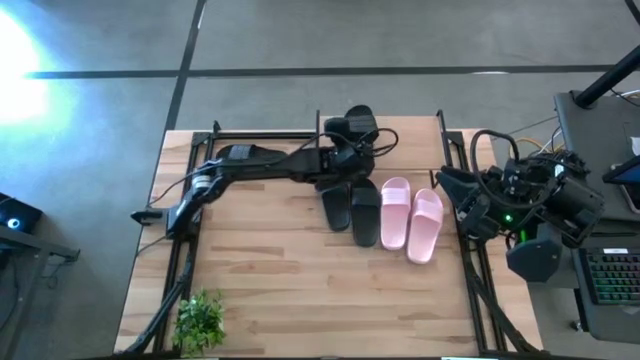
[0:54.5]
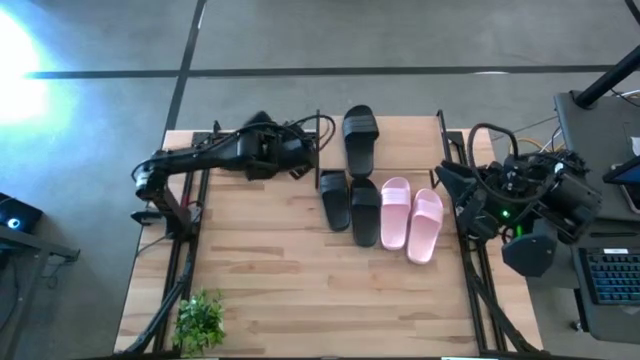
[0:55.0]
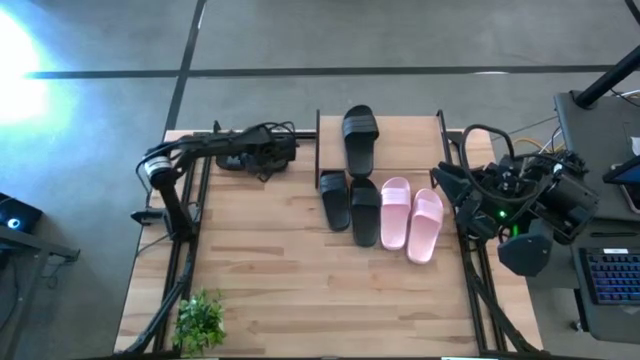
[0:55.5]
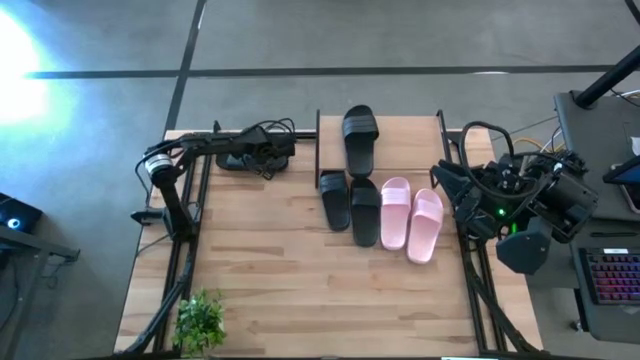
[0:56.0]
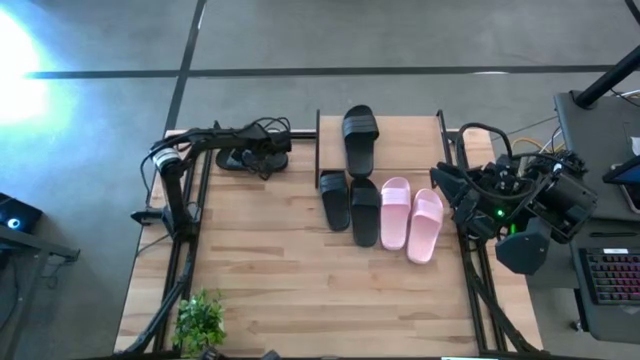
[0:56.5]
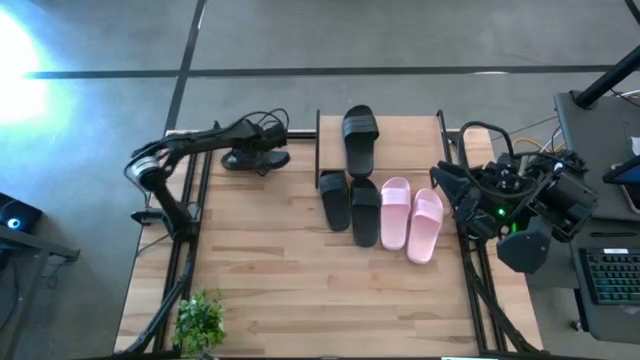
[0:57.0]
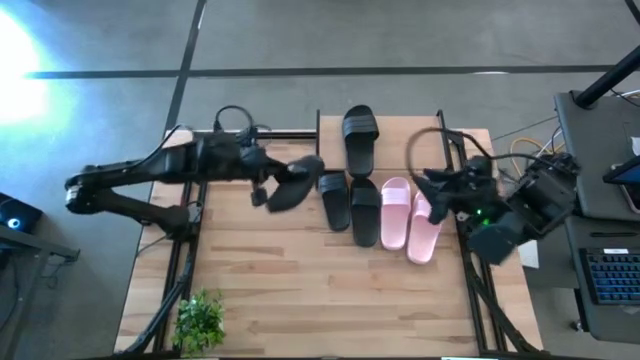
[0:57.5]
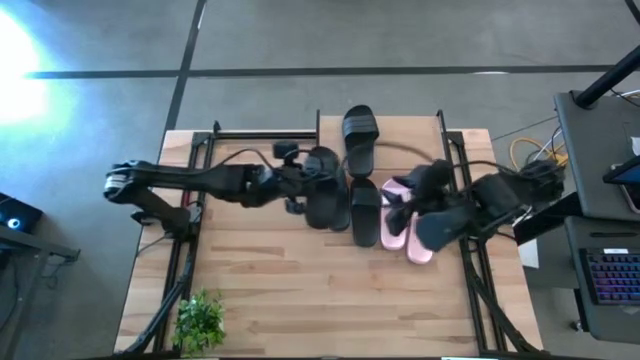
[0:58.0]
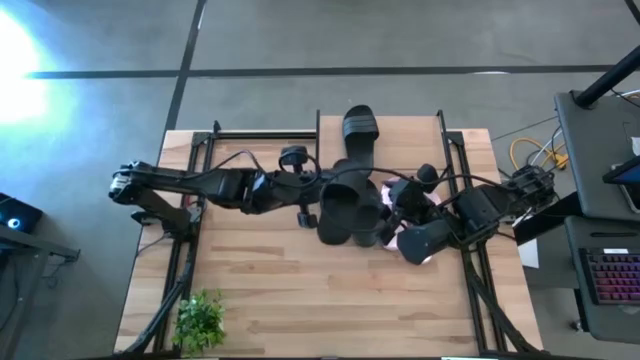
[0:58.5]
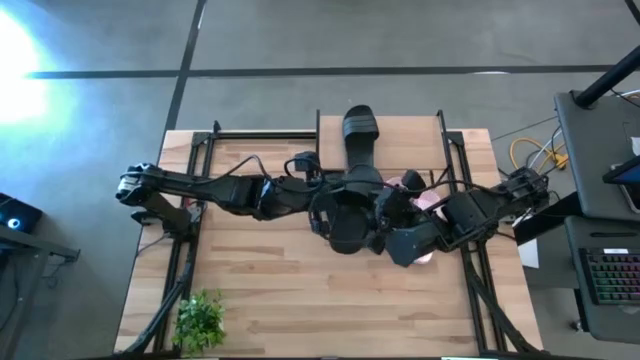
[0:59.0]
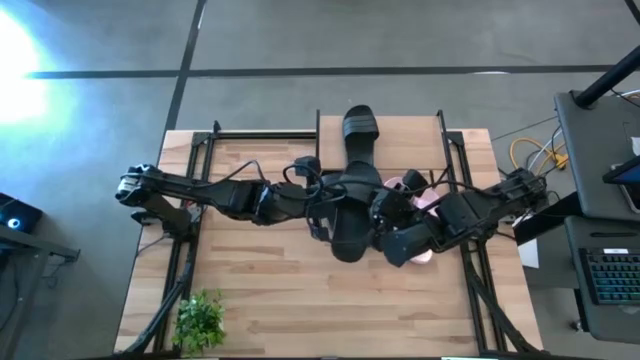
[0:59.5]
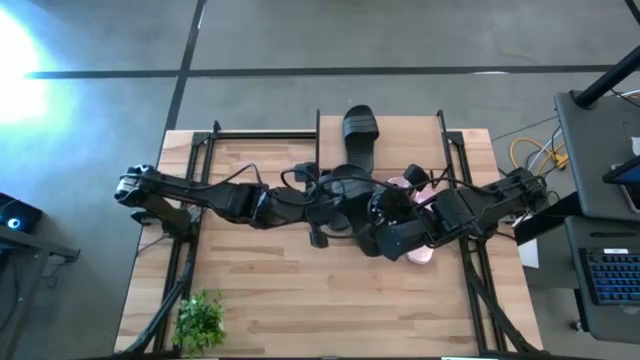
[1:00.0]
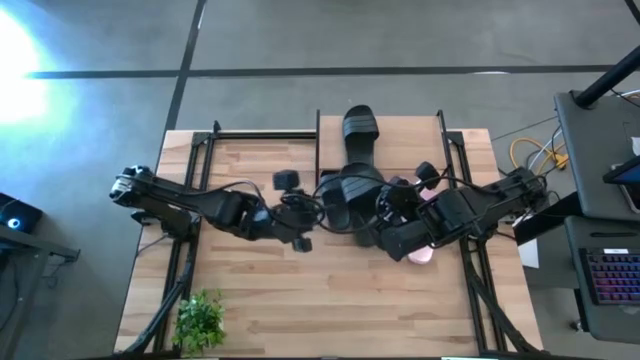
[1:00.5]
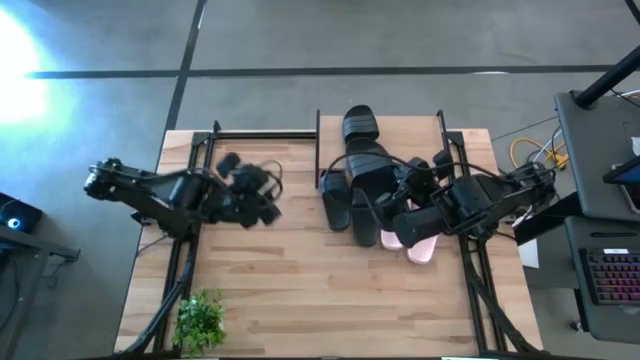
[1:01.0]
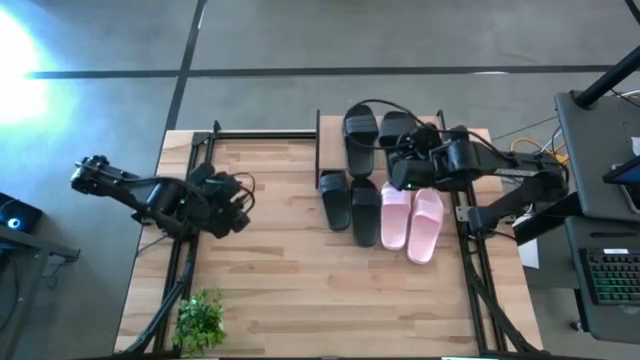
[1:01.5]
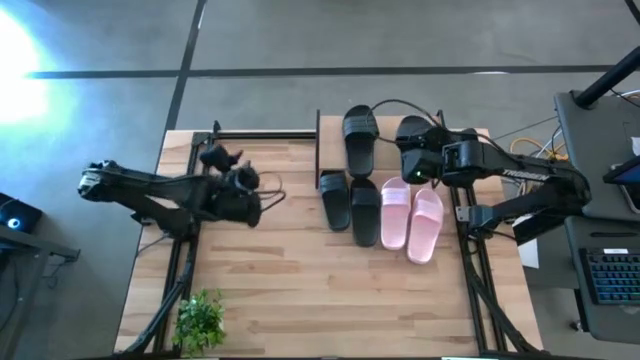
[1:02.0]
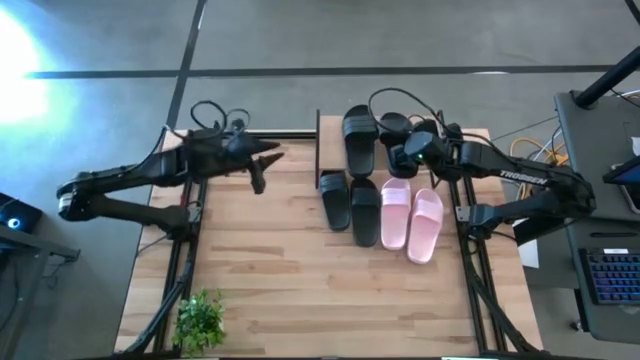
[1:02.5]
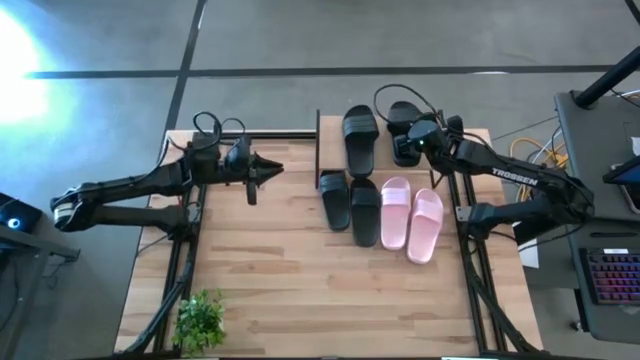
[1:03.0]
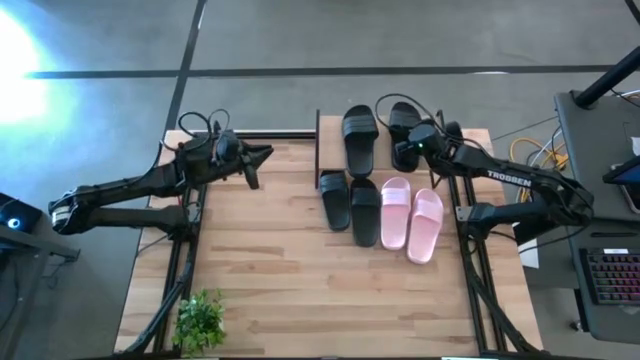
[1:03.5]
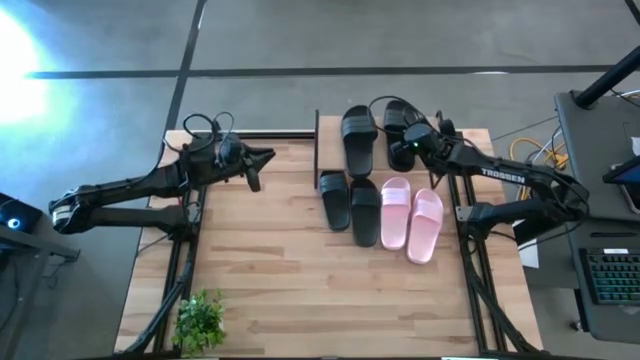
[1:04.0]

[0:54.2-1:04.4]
Task: Pick and place slides into the shelf
Put the black slide on the shelf

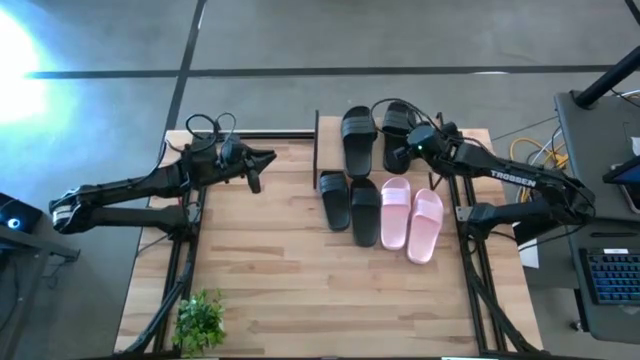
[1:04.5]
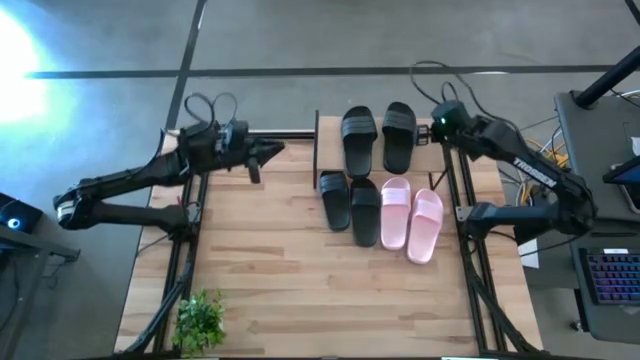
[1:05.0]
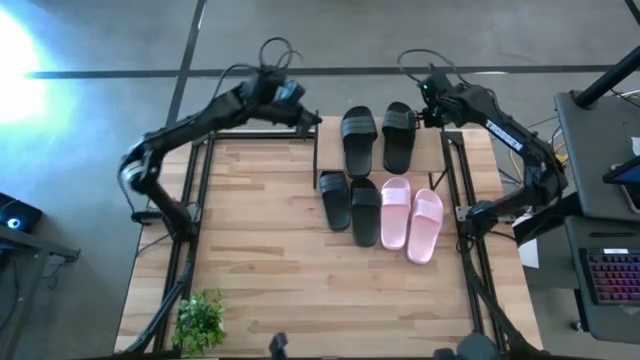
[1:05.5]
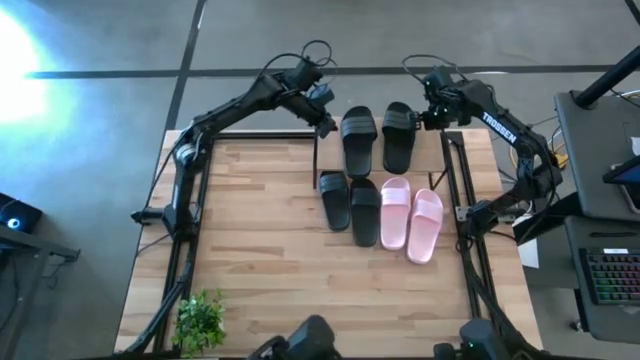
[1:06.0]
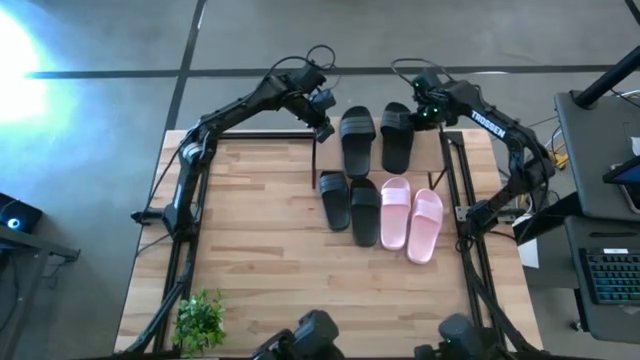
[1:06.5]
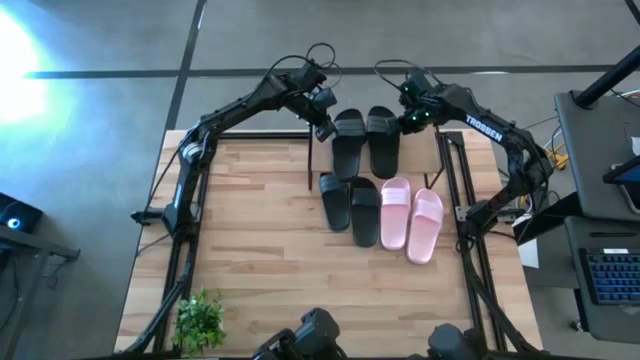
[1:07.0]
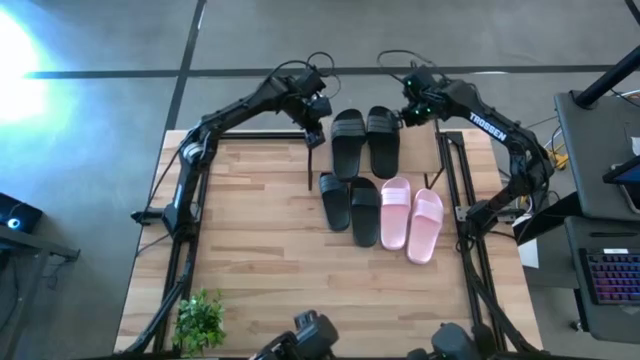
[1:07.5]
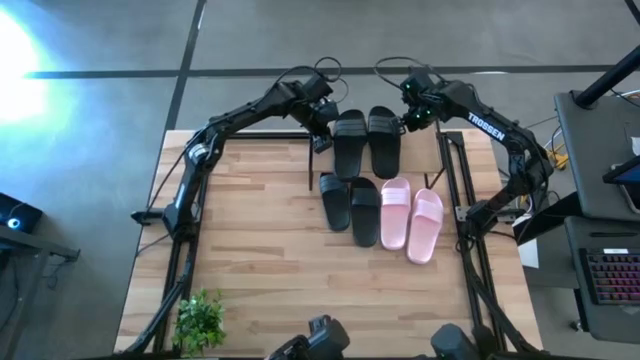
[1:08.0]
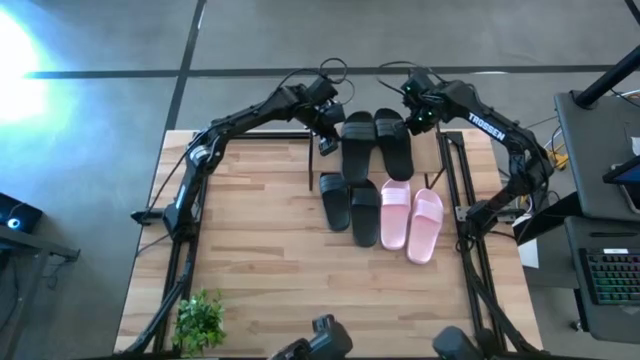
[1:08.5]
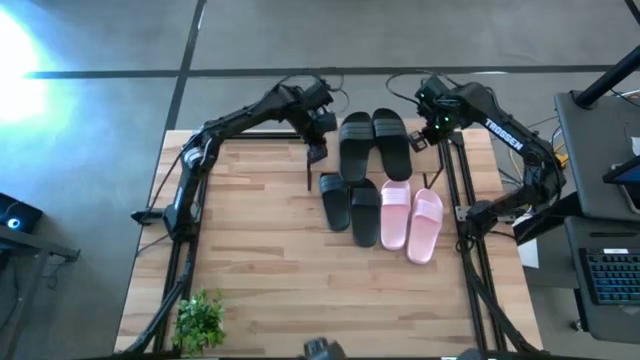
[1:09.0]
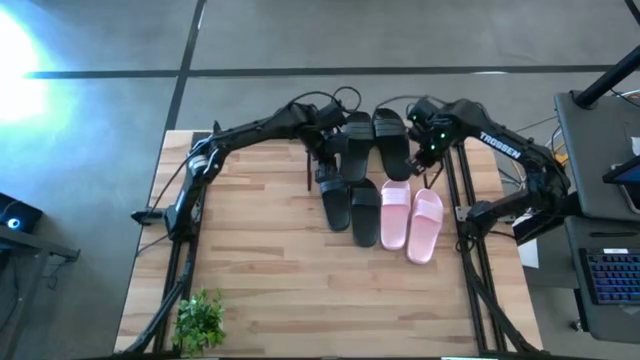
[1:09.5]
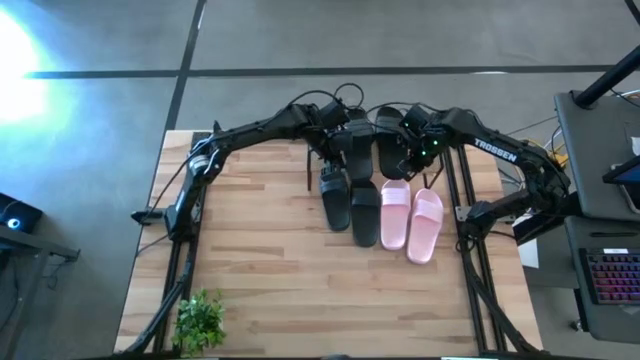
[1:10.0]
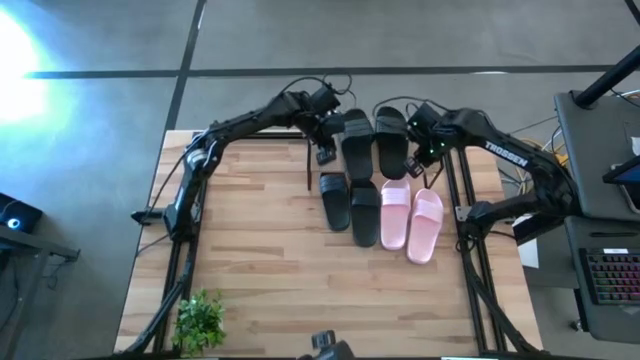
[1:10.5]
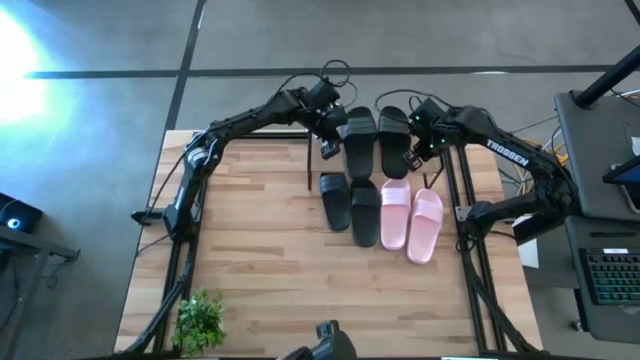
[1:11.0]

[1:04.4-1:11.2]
Adjust the black slides on the shelf

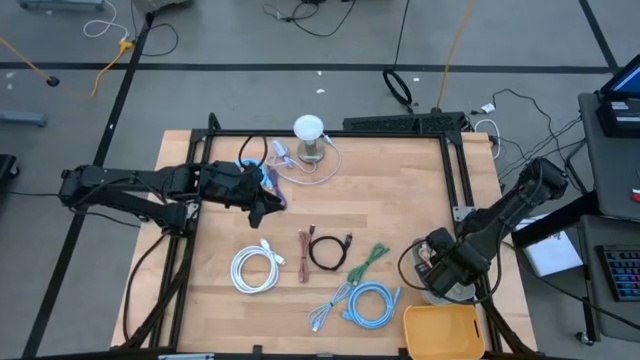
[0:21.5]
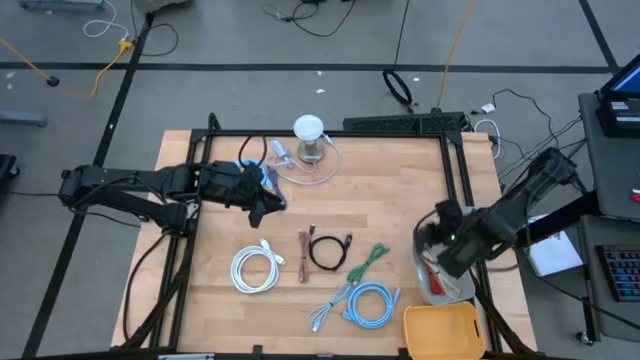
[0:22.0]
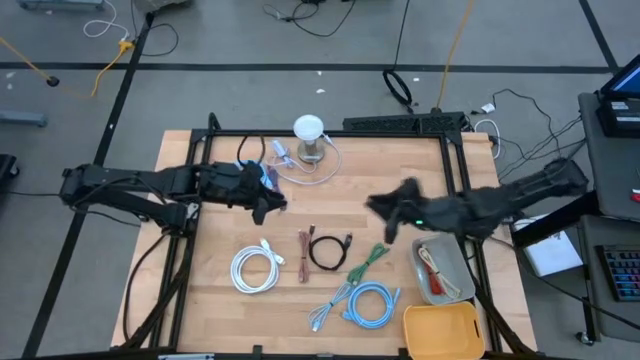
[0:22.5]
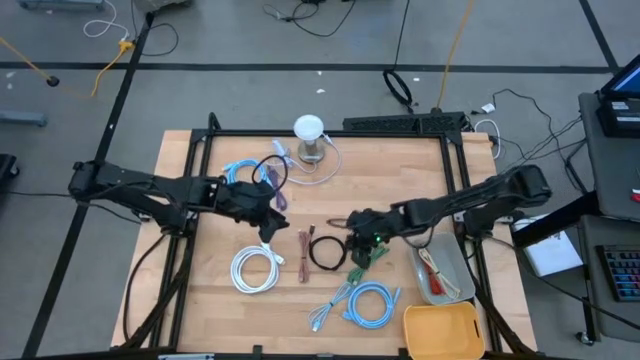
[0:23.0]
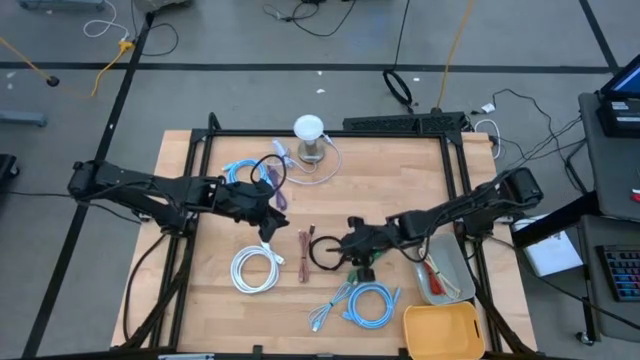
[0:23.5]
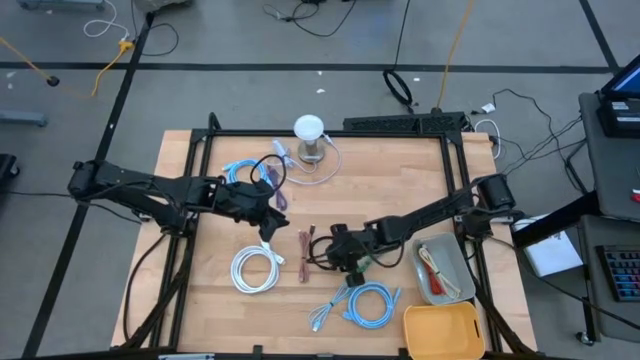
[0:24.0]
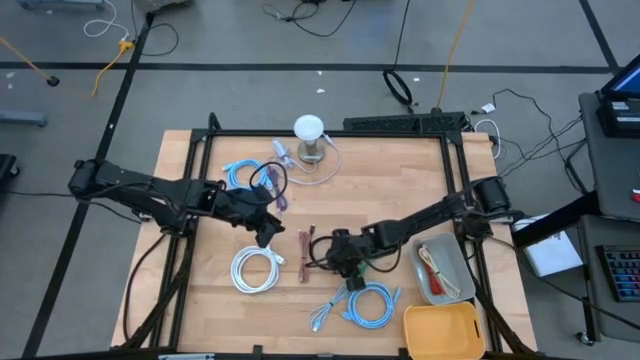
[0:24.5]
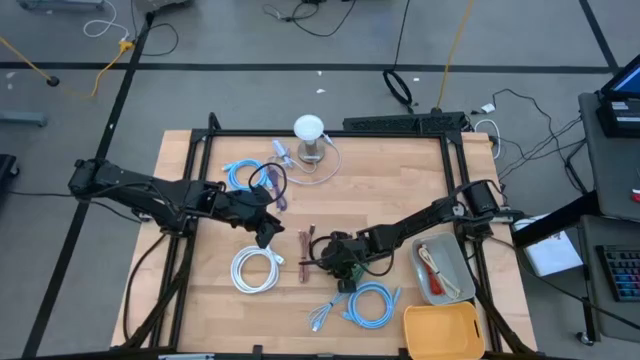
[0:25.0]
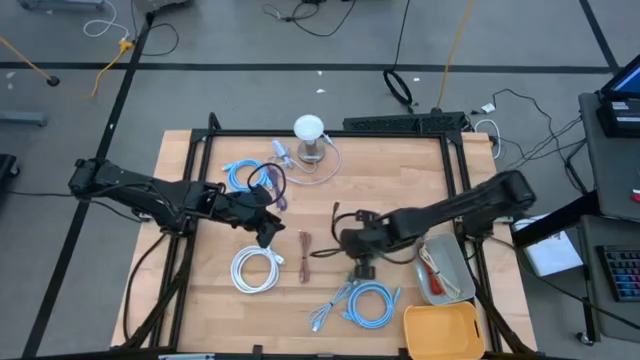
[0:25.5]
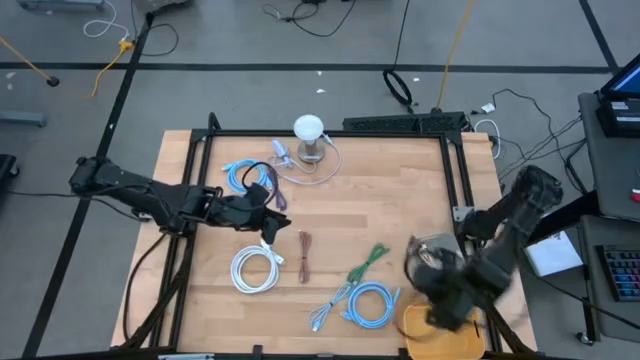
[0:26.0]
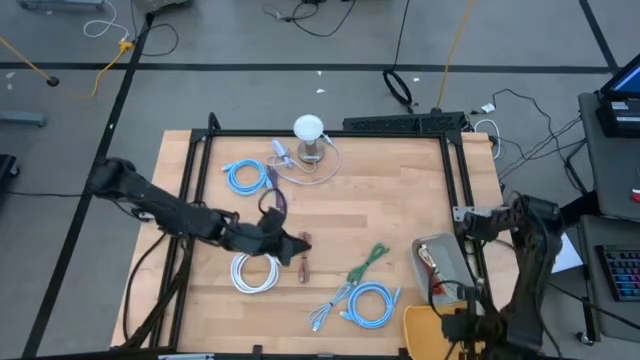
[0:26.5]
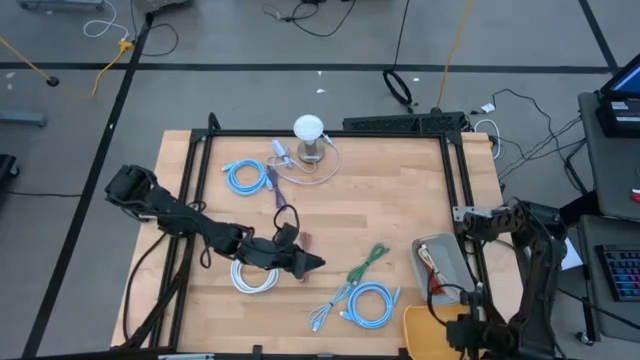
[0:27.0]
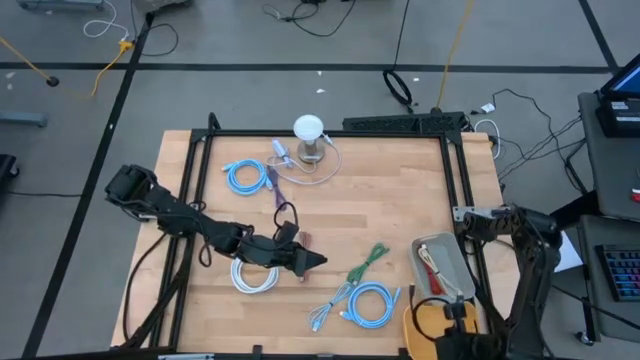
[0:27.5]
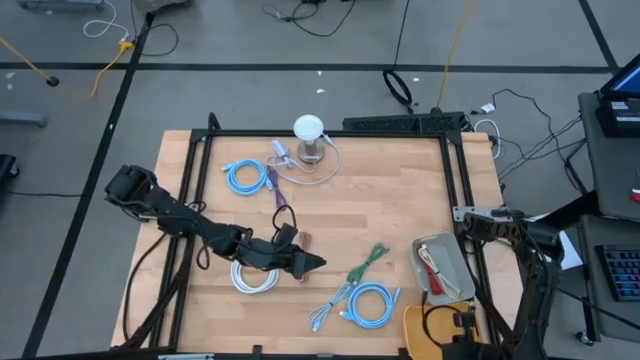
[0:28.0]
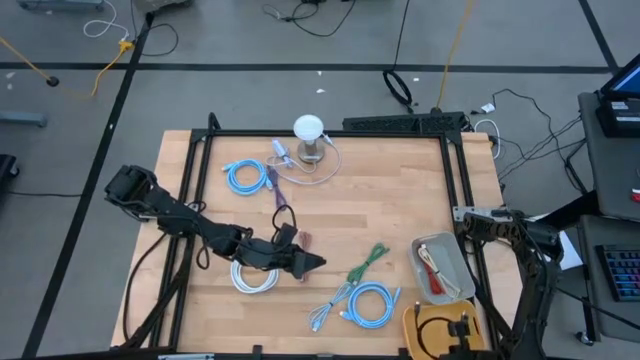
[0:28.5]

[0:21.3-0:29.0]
Task: Pick & Place USB Port
Put the black HDMI cable into the yellow bin
